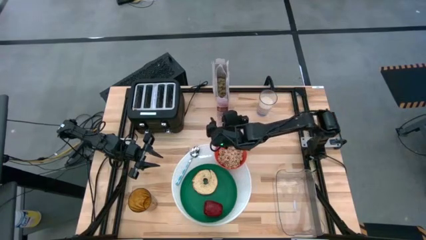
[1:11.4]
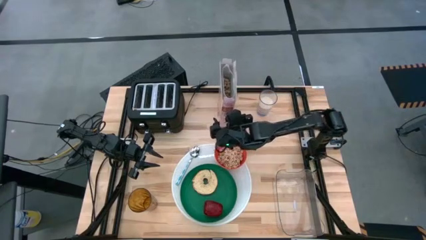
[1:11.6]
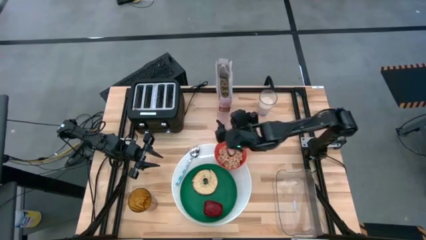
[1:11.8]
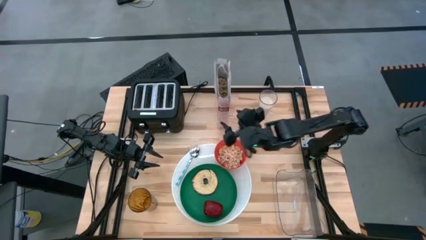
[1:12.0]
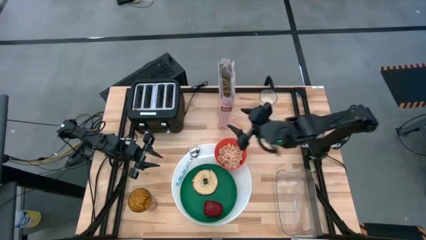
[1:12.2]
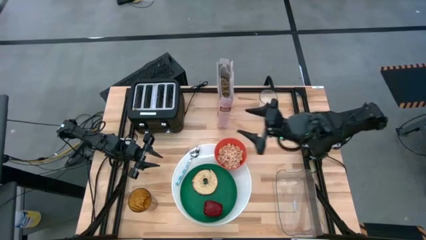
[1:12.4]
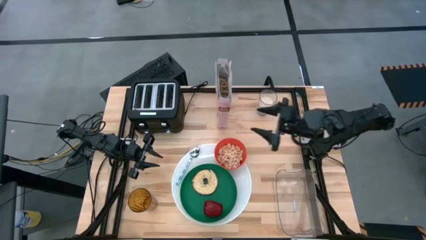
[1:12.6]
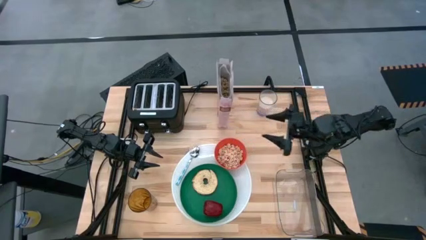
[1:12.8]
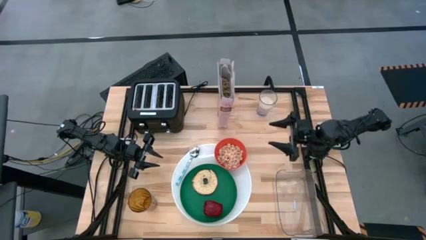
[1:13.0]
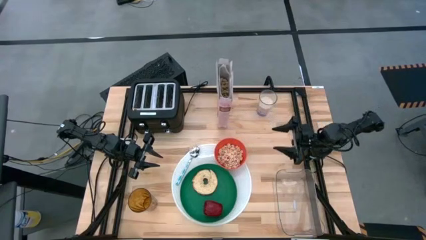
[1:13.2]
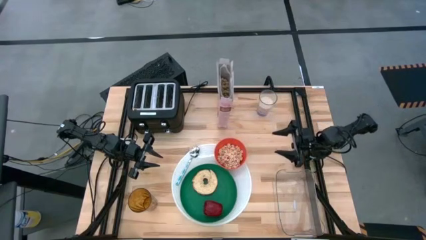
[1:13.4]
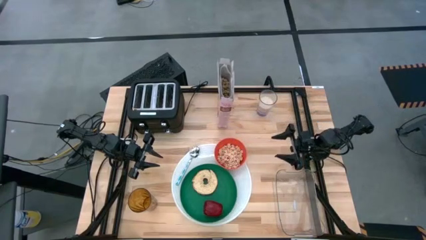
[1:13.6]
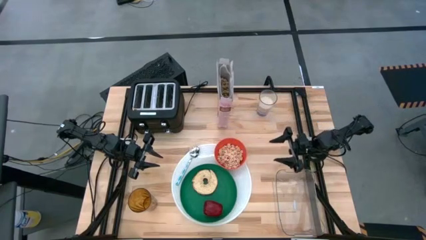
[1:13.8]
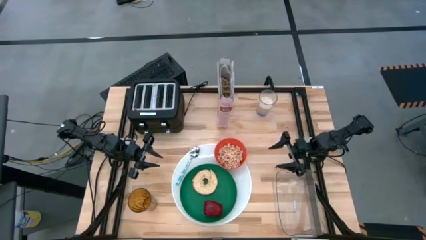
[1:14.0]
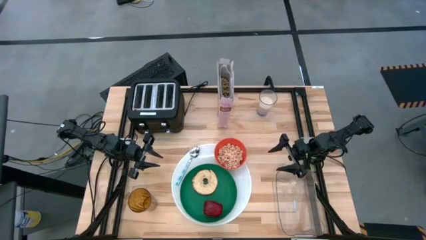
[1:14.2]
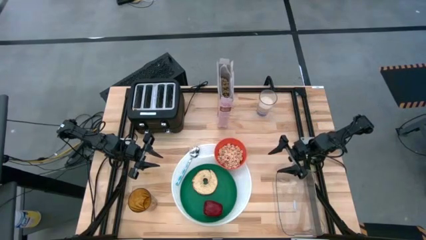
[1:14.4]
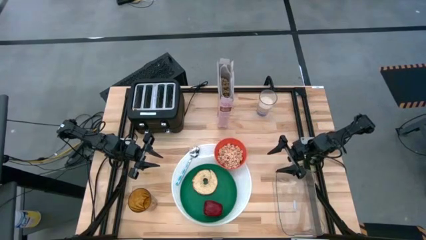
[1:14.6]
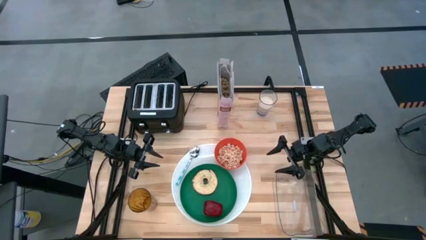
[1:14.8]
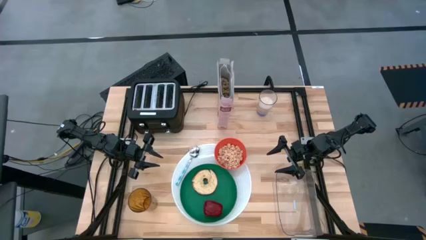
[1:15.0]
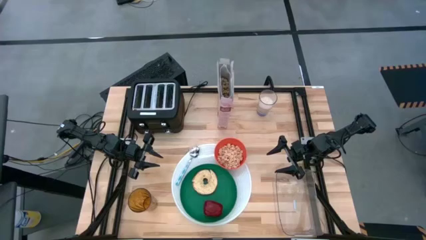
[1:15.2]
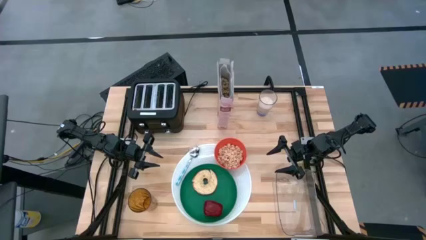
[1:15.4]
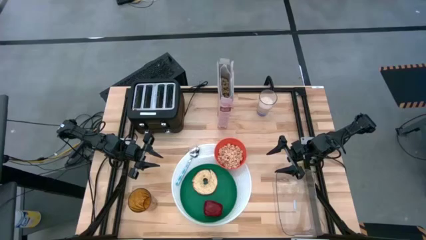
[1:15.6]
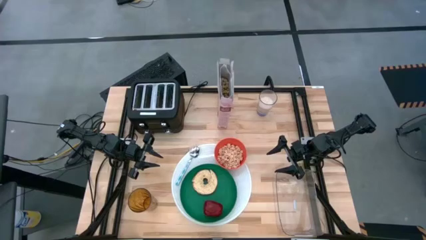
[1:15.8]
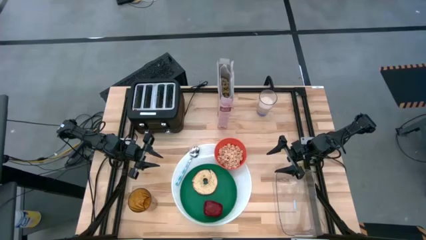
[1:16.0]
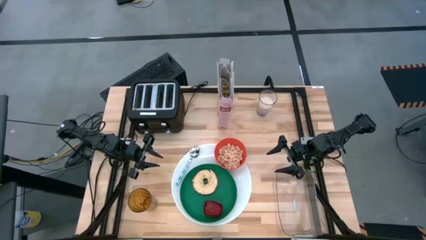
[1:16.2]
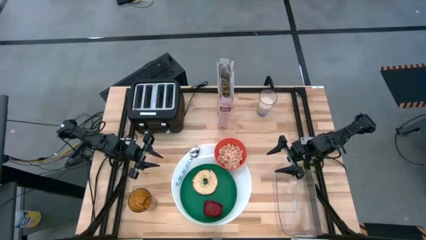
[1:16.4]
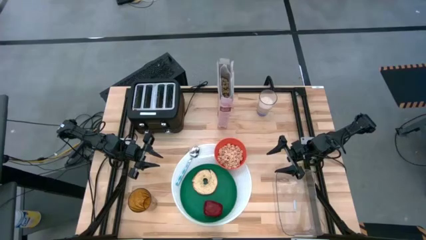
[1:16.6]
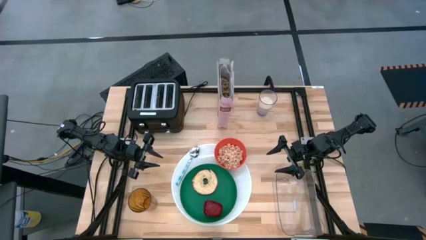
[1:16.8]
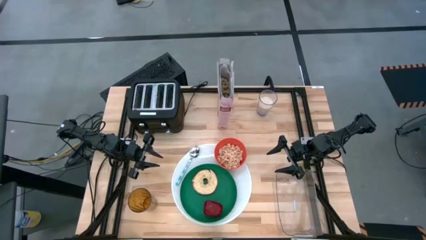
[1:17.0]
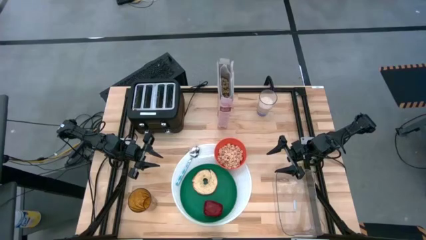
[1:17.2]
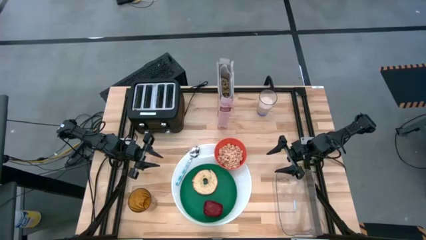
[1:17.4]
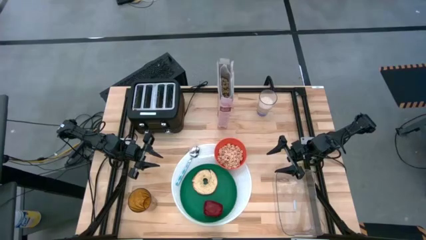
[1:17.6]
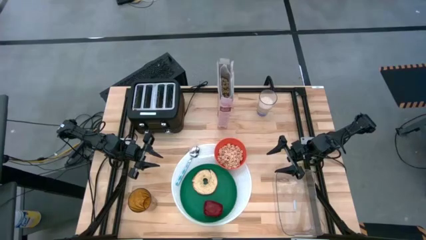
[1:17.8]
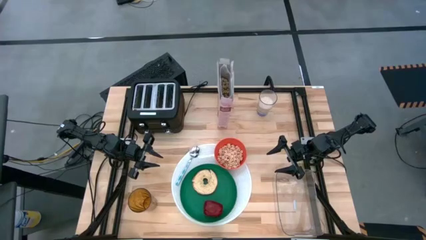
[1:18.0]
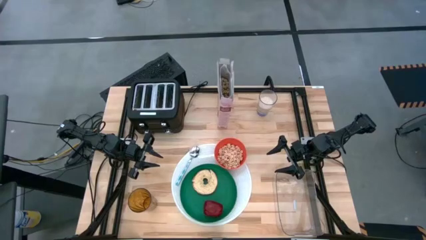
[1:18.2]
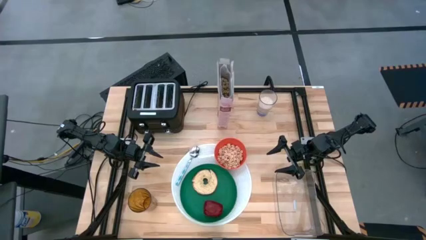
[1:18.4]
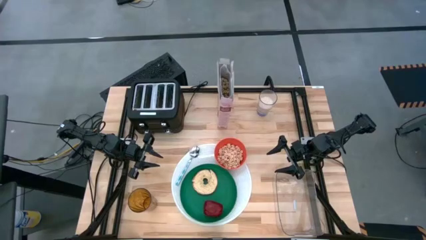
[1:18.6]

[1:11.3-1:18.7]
Task: Arrange a breakfast setting
Return to Home Position
